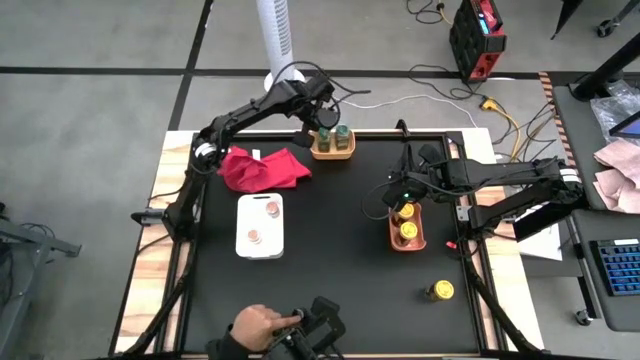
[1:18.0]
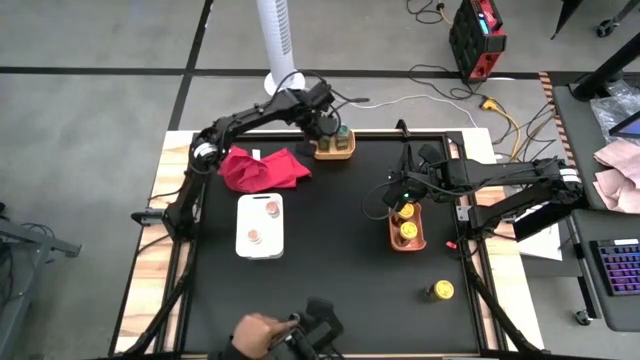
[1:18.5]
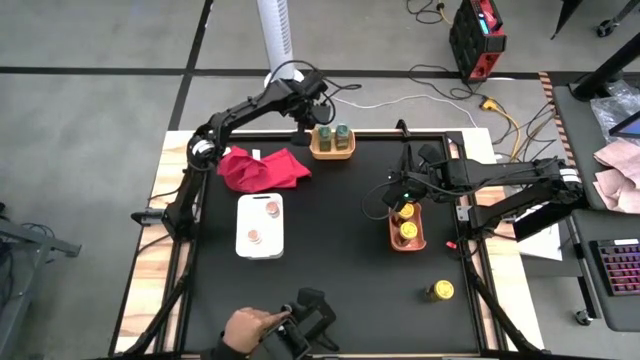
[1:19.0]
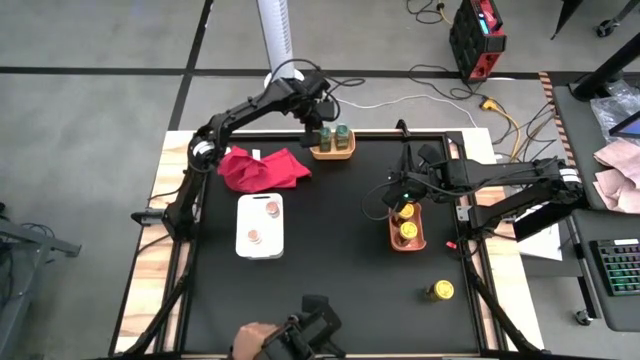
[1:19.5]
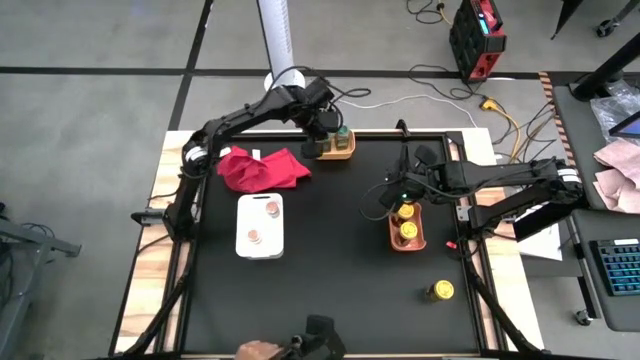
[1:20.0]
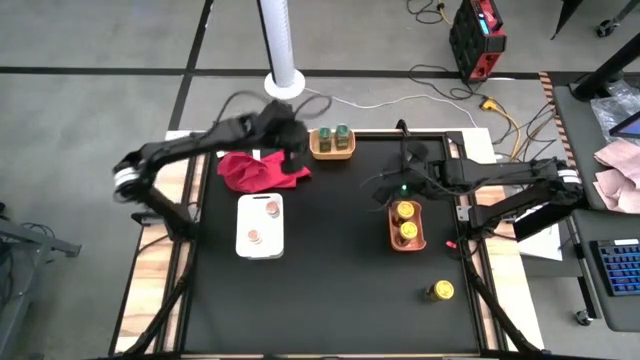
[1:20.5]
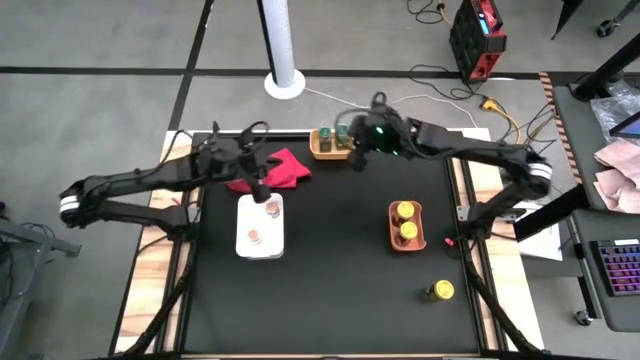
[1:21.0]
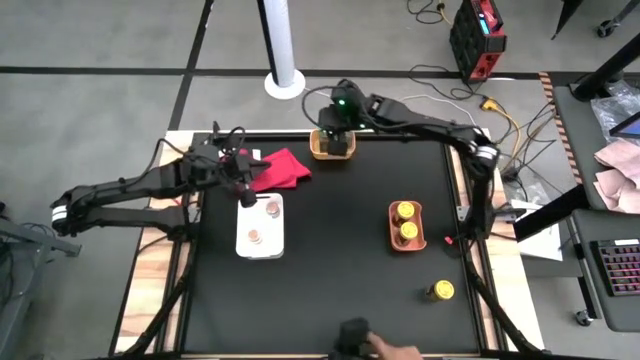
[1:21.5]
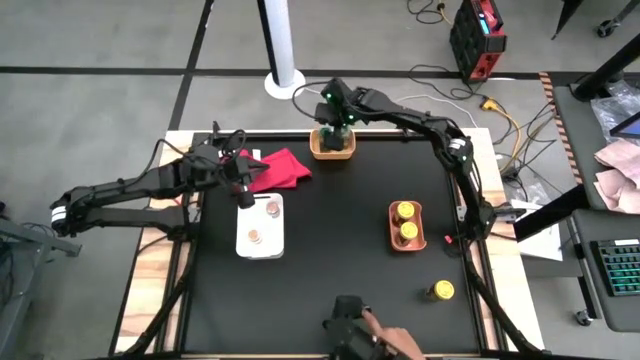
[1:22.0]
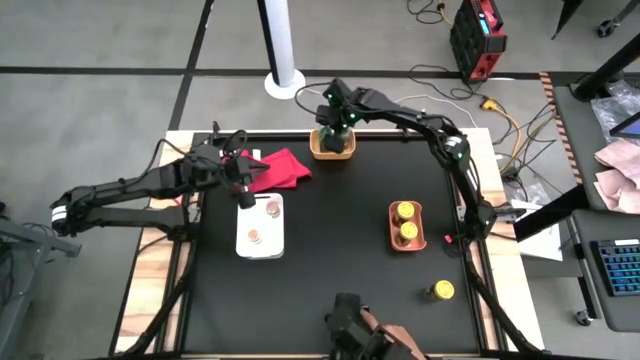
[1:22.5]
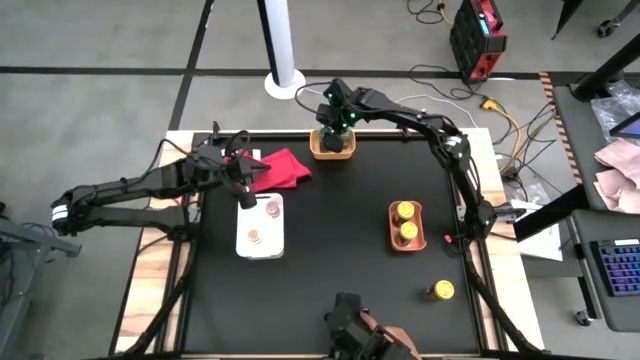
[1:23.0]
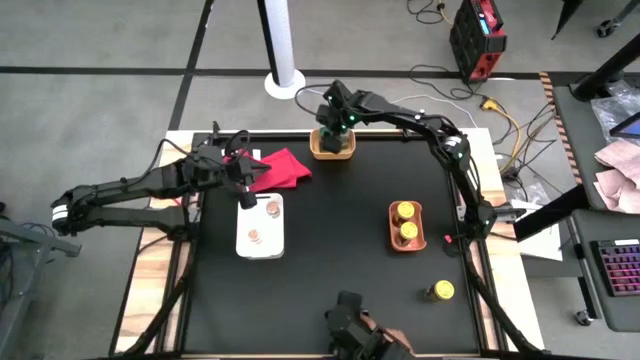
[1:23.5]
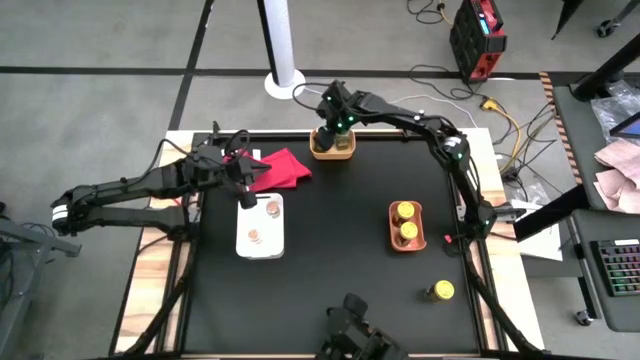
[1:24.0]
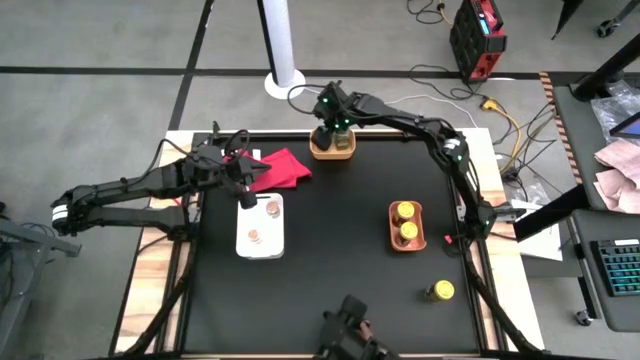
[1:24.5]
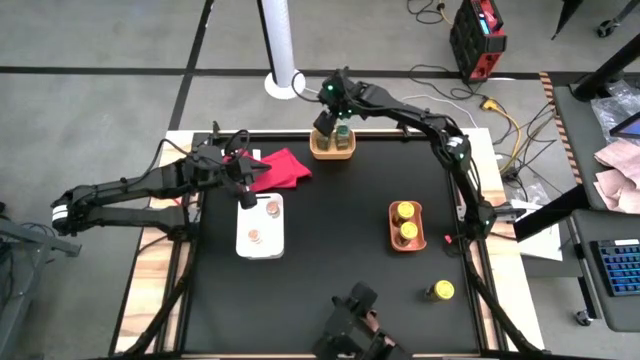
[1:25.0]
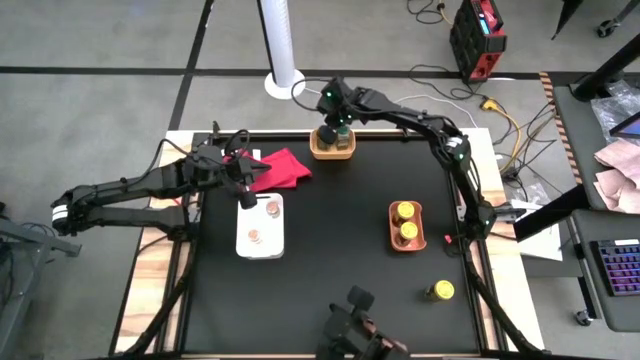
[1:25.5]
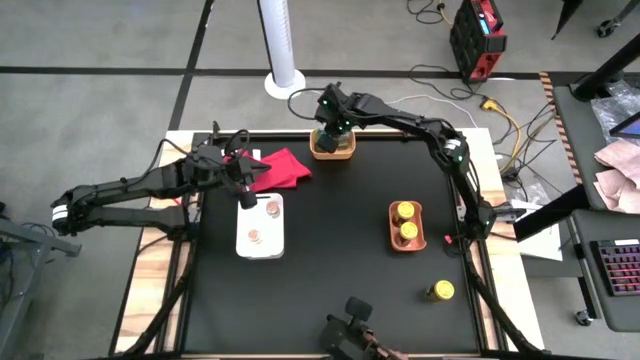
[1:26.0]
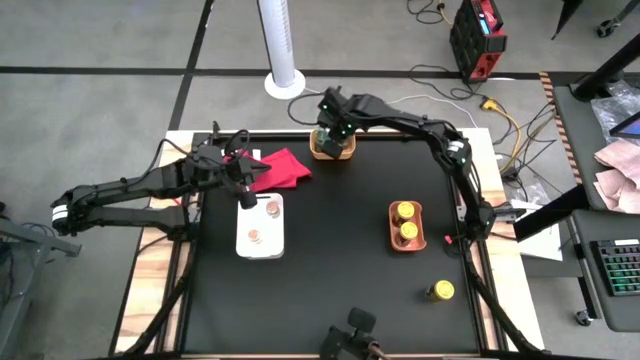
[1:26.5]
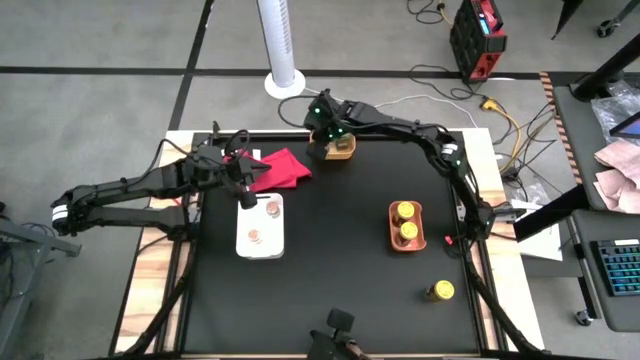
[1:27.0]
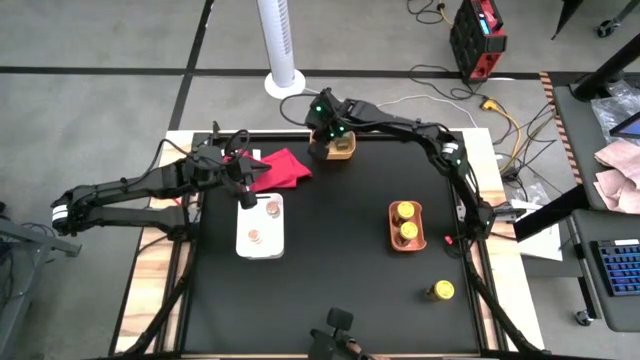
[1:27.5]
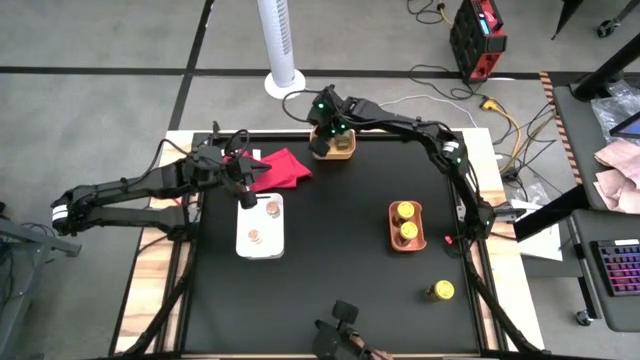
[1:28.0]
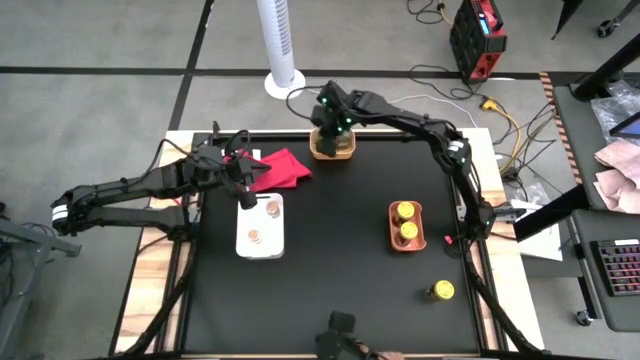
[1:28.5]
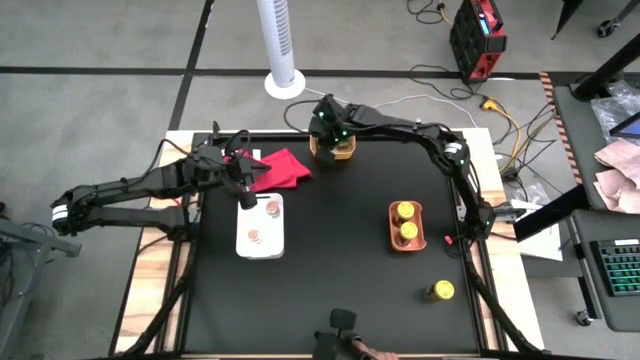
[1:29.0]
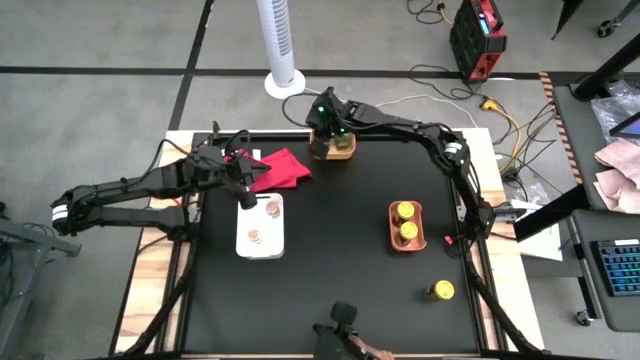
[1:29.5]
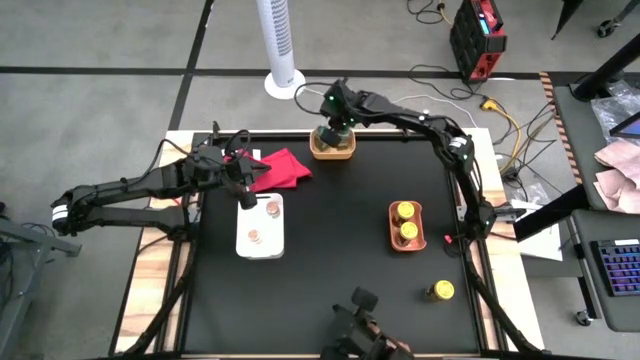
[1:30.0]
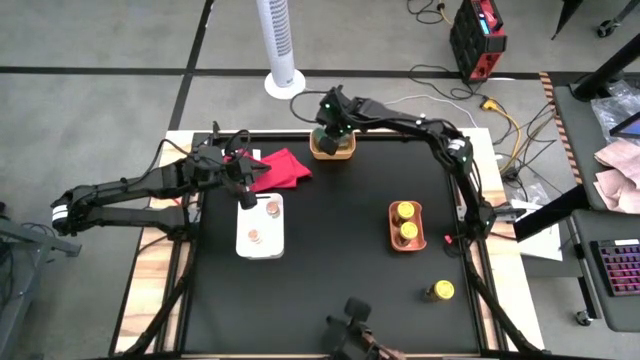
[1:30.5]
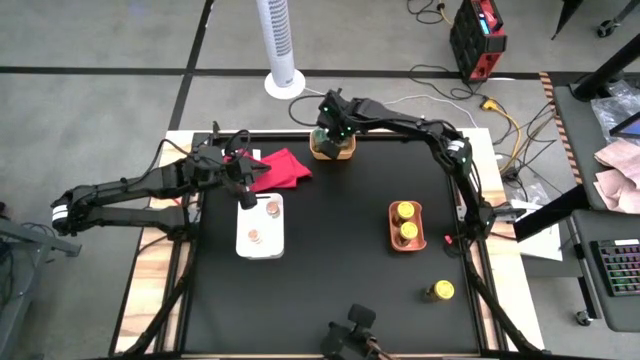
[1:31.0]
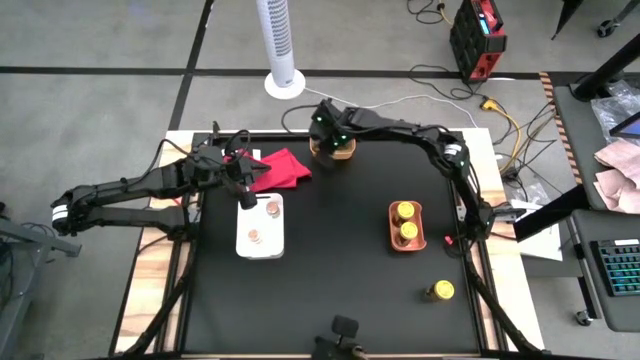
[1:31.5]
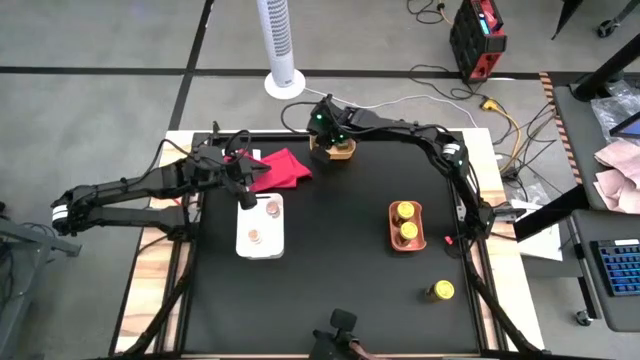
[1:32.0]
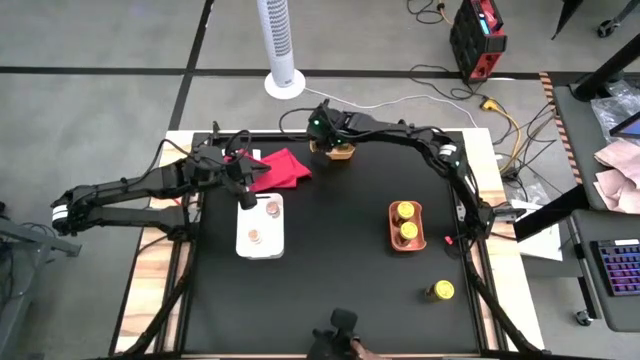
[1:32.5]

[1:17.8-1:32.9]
Task: Sort spices by type
Put the green seasoning bottle into the yellow bin

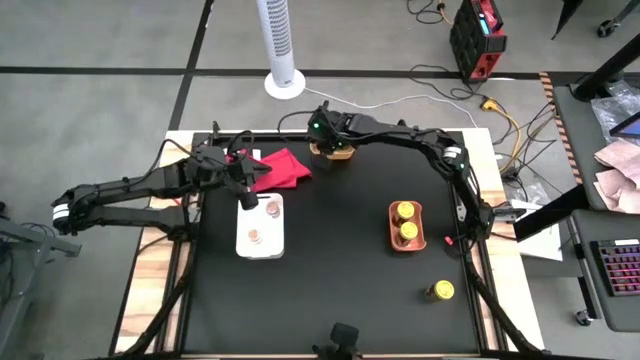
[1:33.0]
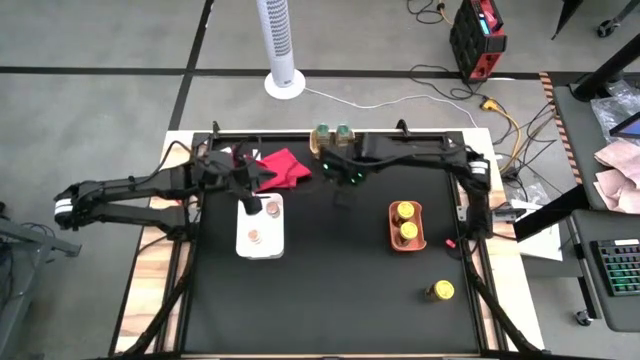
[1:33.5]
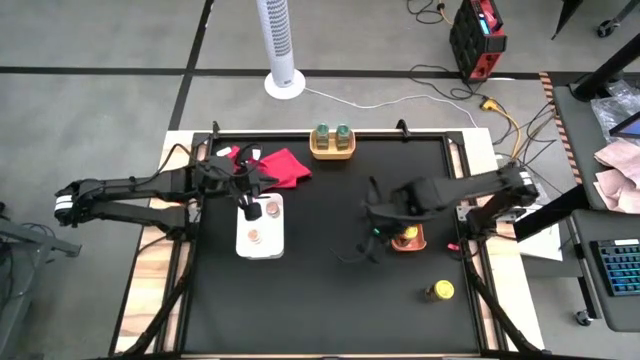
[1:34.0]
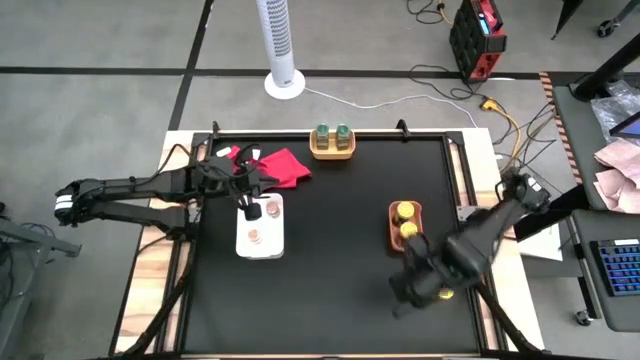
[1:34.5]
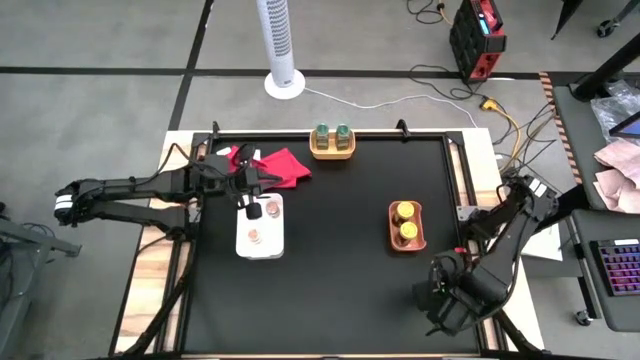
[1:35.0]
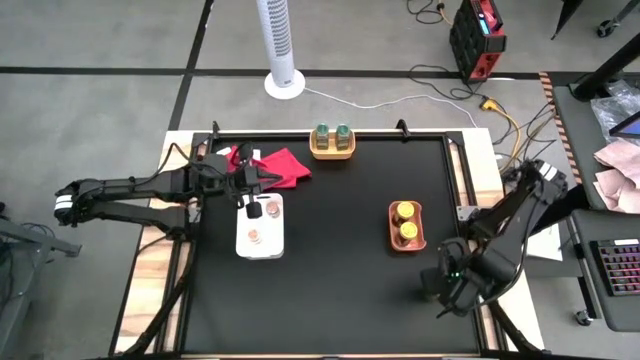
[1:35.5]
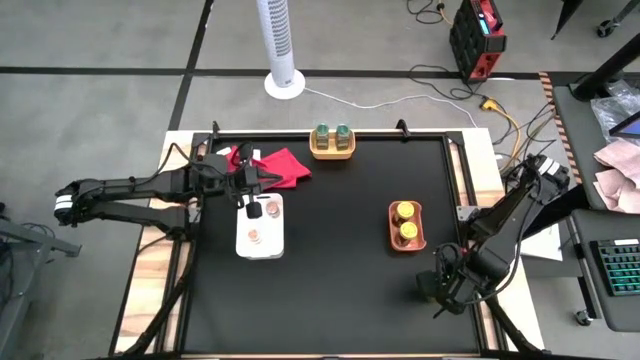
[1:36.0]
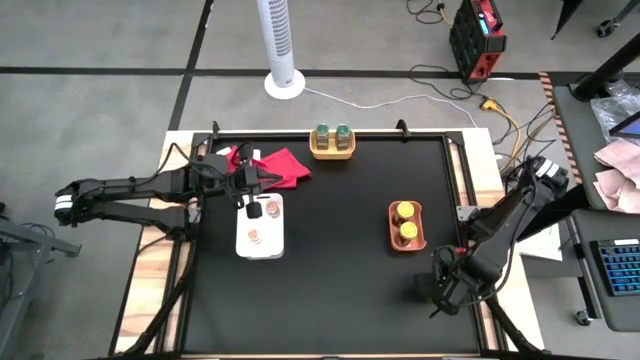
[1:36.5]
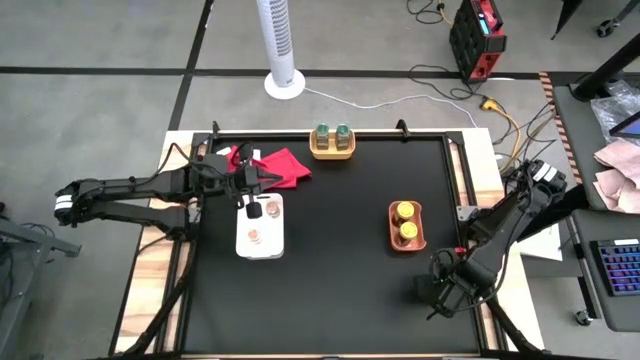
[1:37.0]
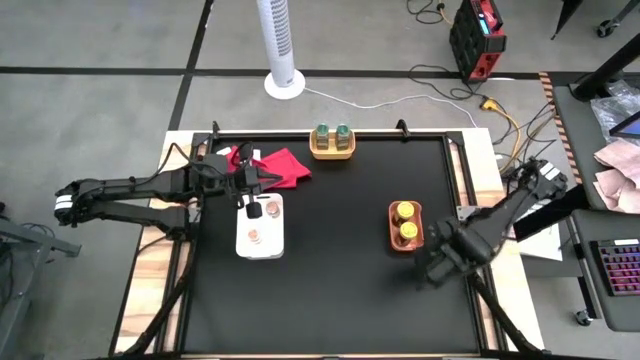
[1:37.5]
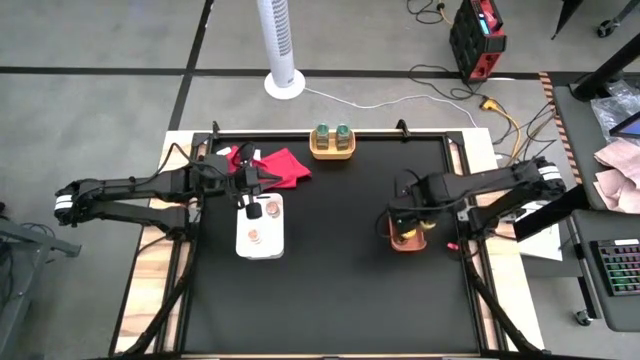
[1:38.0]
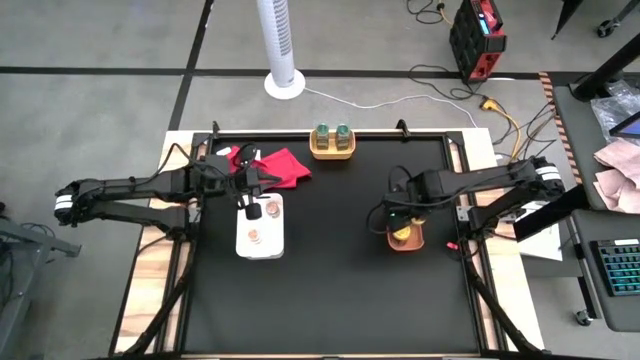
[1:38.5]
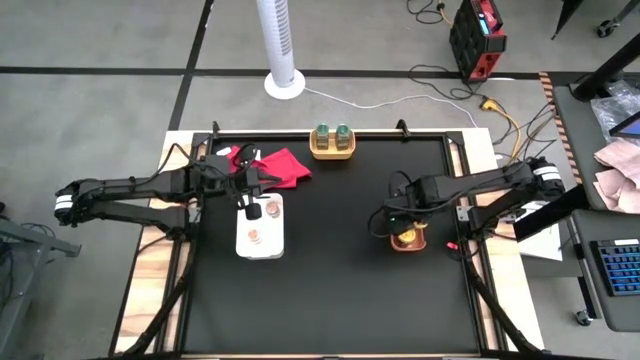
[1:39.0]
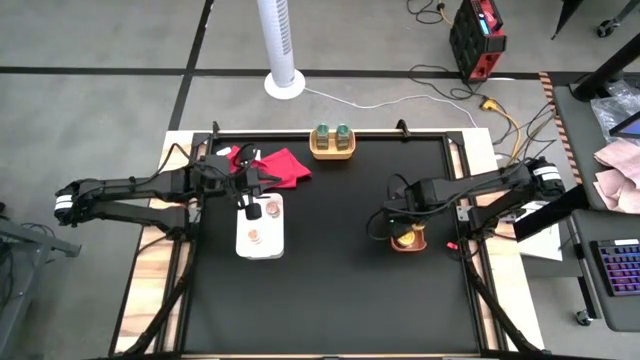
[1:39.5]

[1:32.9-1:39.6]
Put the yellow seasoning bottle into the orange bin
